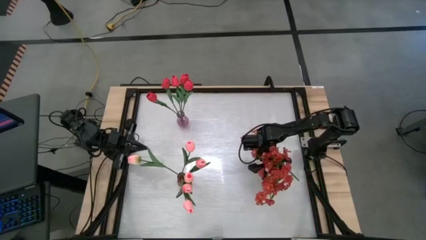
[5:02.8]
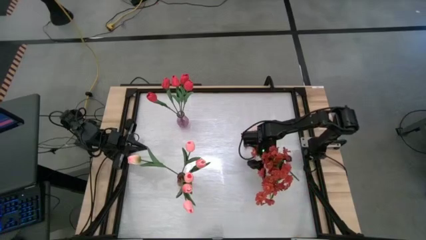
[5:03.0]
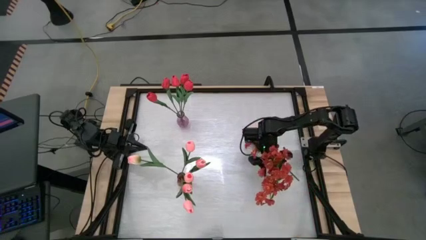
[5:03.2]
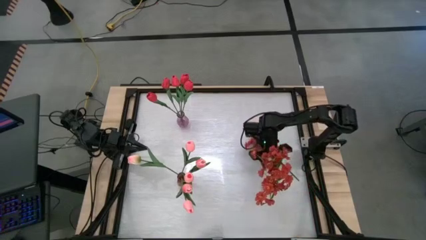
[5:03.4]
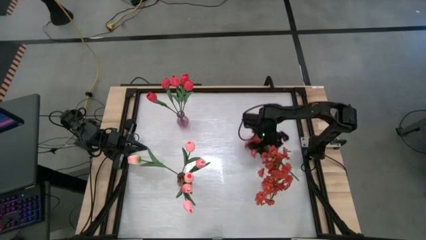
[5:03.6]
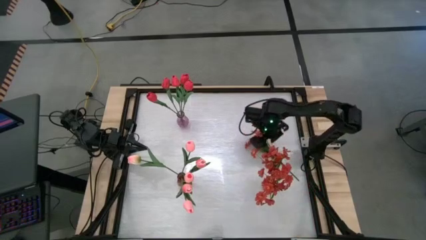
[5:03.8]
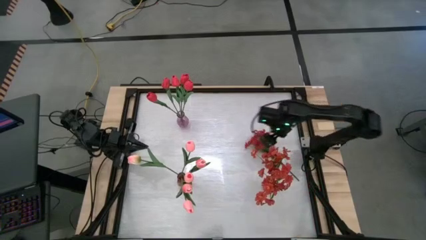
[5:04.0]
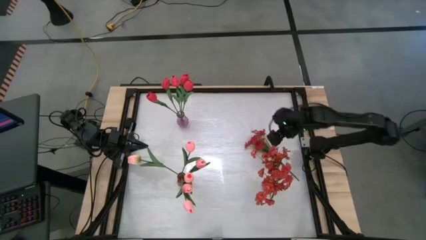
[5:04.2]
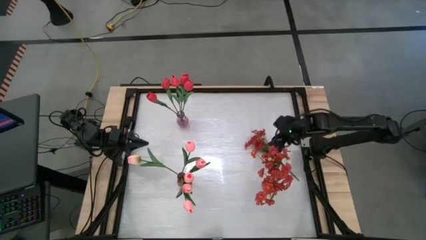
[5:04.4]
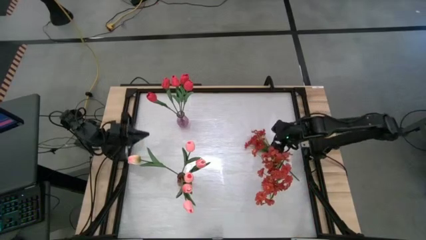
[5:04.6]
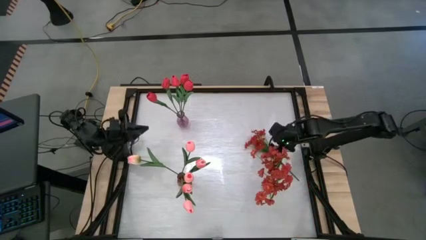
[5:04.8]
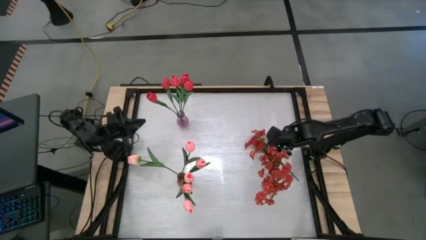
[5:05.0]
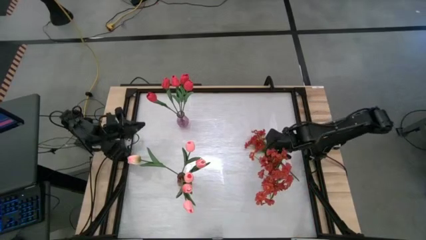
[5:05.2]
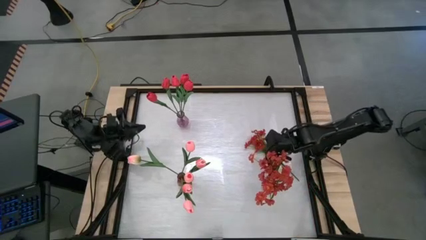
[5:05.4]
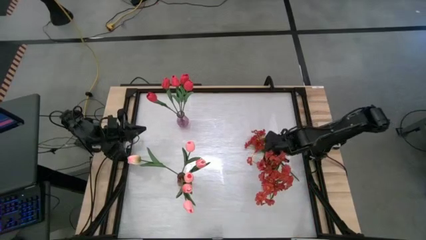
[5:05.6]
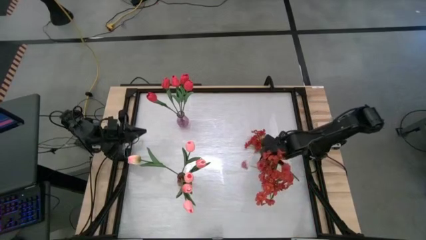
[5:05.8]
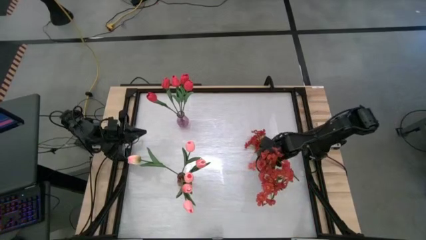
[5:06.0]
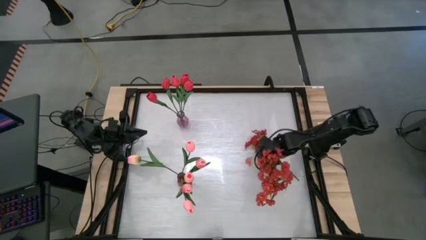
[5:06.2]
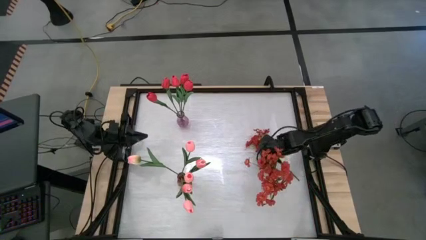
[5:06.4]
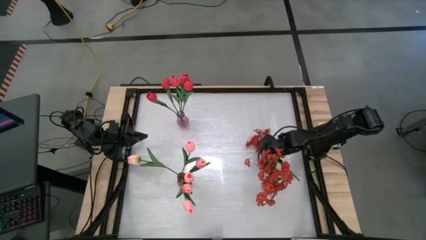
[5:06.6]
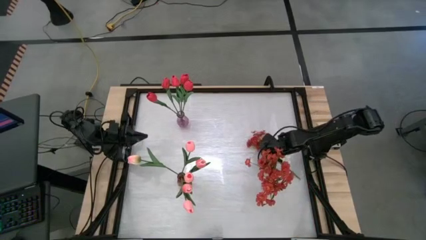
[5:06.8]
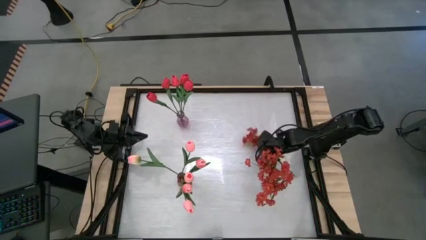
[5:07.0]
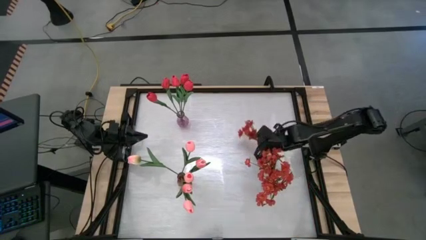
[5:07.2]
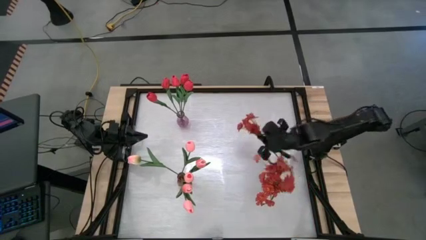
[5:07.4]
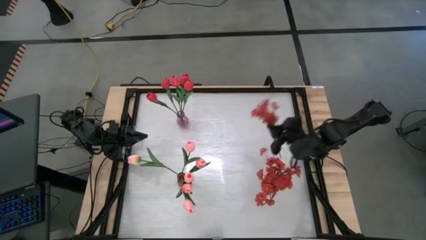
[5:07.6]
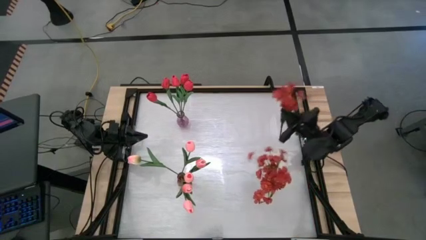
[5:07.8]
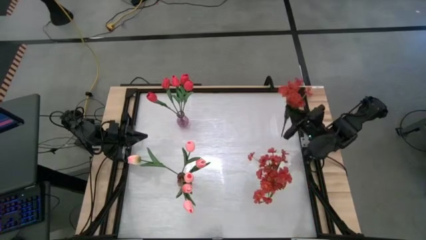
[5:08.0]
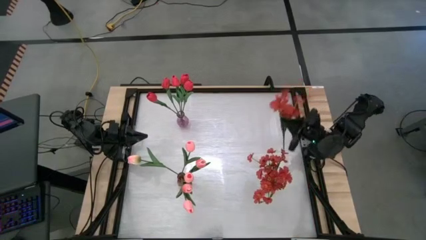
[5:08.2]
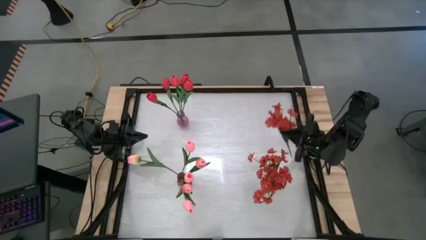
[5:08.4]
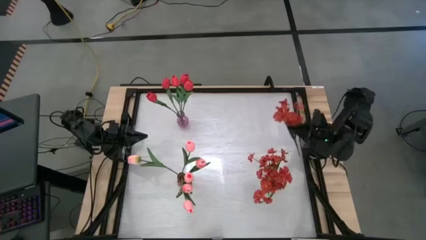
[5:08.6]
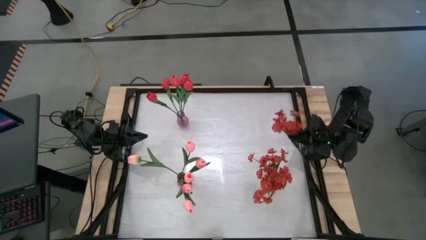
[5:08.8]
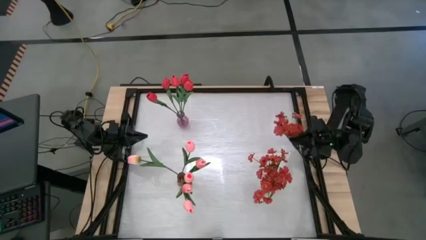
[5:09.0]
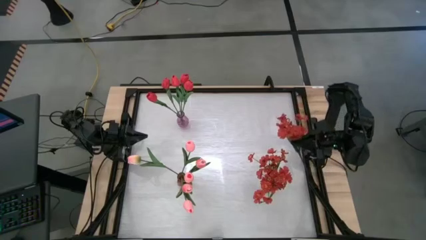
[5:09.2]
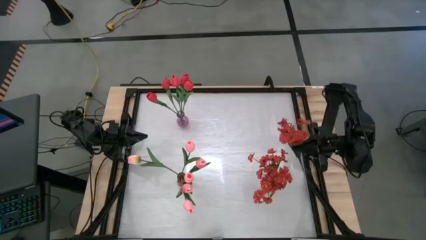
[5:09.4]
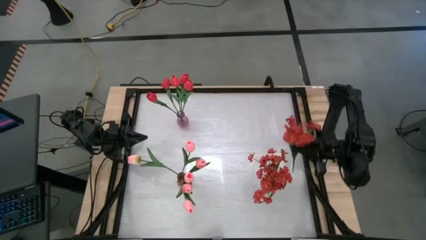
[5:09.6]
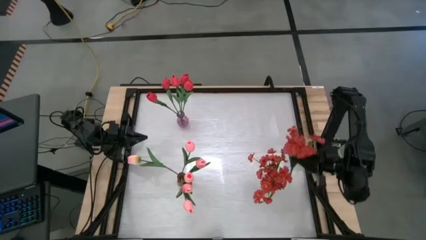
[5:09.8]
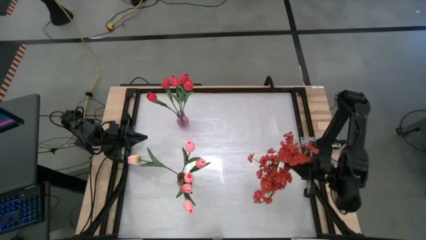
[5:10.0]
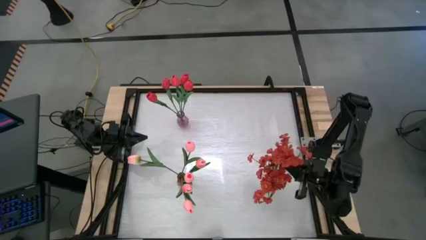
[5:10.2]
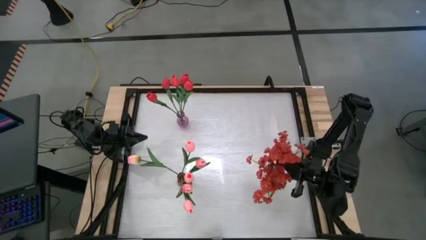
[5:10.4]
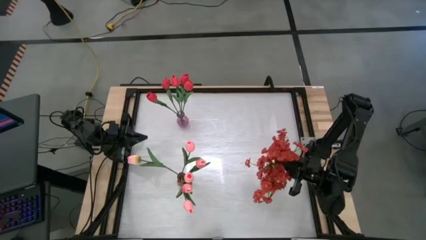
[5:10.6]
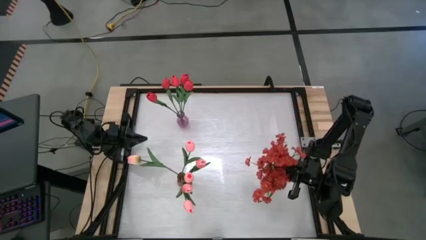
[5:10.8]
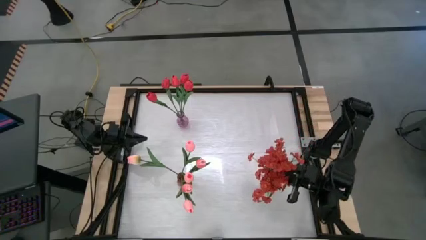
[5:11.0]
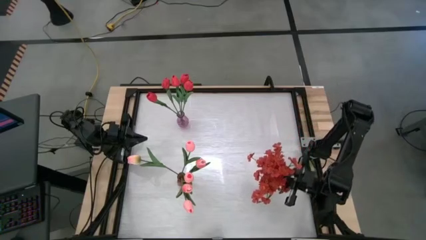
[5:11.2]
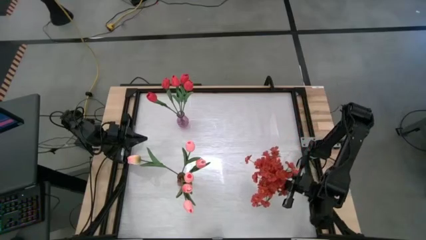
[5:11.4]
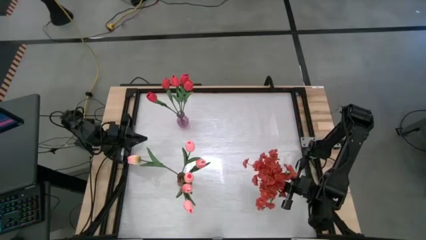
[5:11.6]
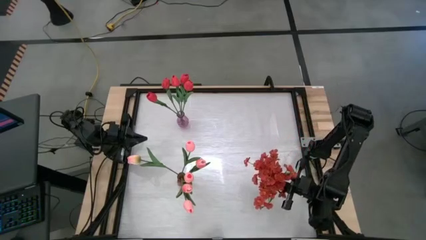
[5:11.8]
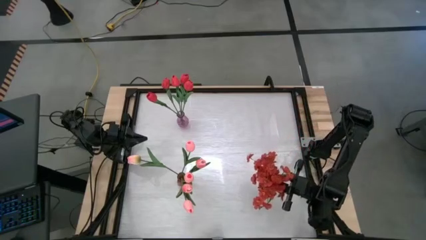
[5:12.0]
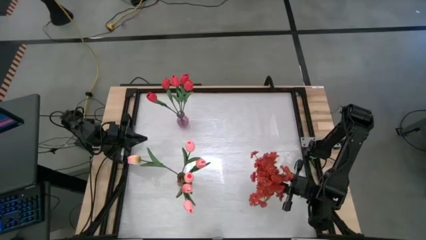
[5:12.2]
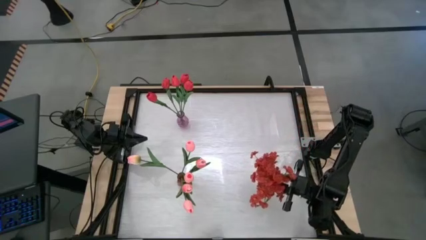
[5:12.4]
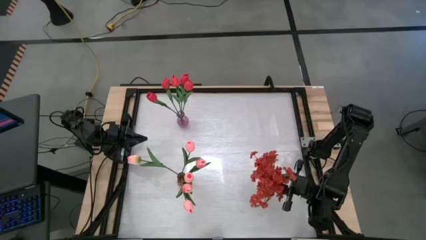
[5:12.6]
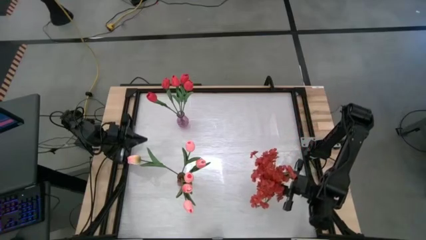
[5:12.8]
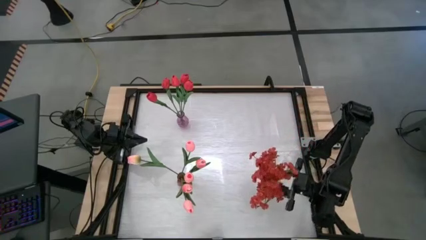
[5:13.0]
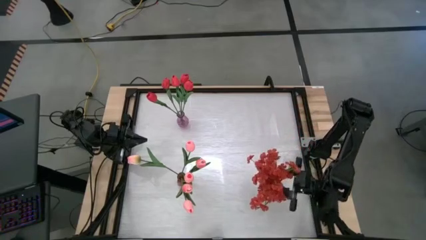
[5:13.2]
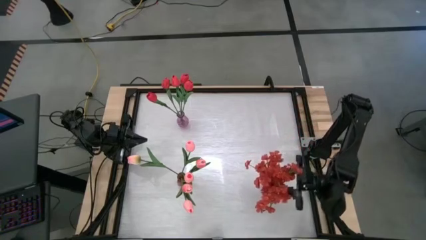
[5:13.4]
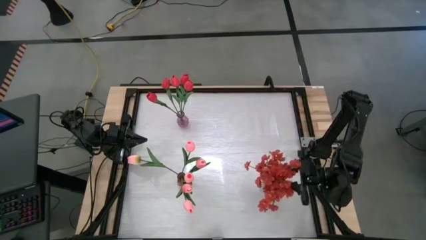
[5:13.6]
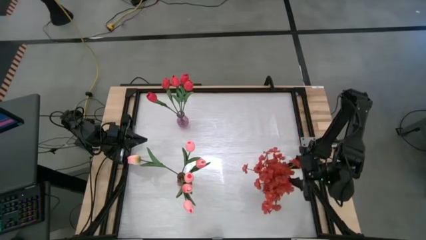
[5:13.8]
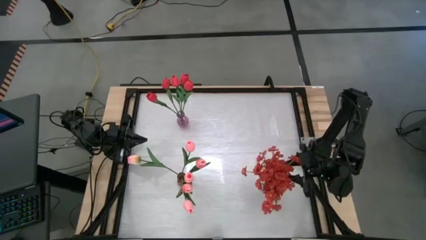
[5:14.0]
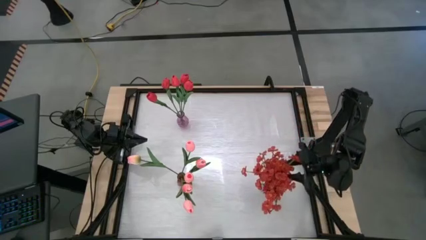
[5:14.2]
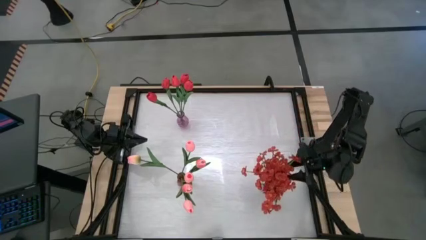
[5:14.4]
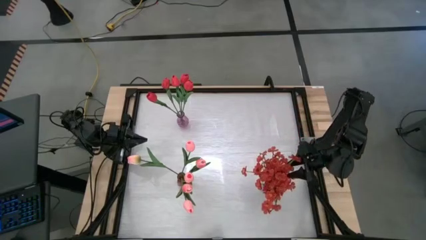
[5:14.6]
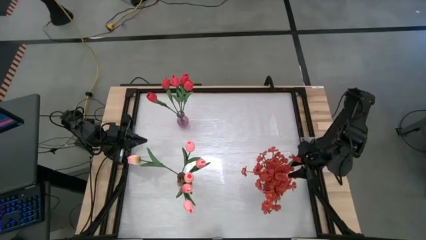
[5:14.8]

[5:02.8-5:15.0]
Task: Sort flowers into vase by color
Put the red flowers into the transparent vase
